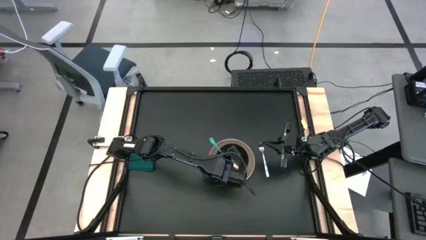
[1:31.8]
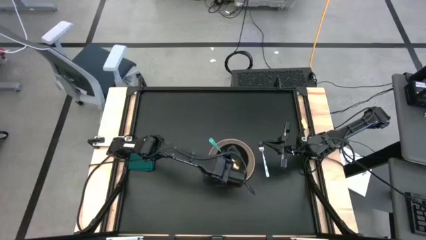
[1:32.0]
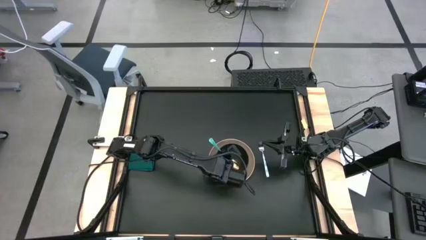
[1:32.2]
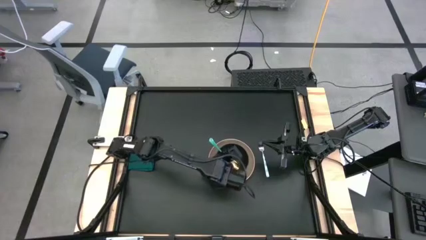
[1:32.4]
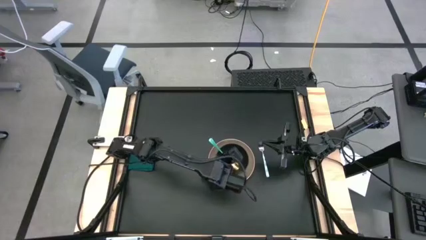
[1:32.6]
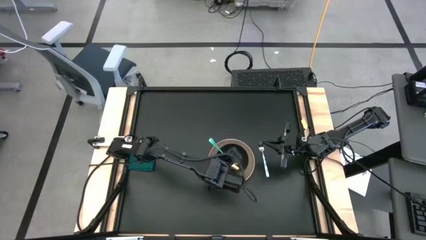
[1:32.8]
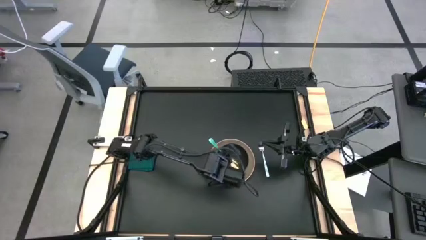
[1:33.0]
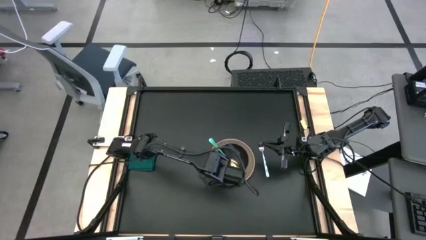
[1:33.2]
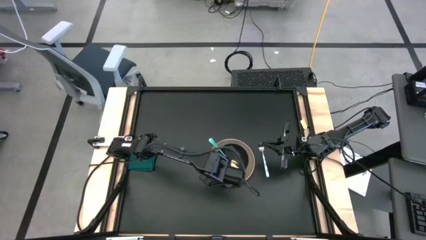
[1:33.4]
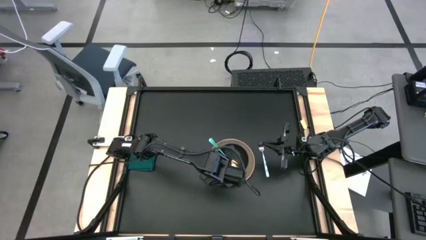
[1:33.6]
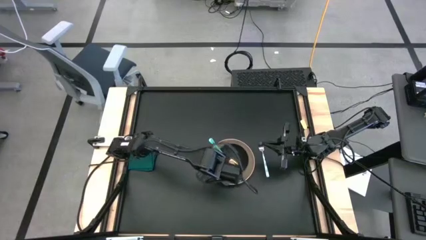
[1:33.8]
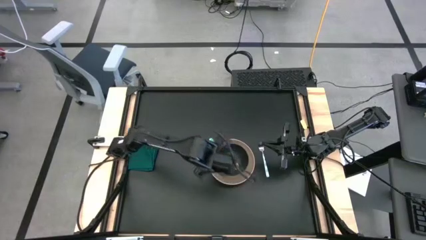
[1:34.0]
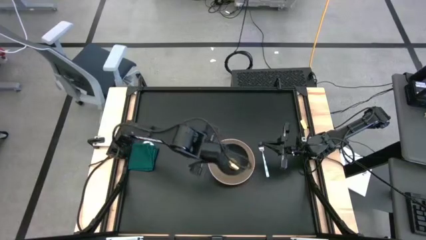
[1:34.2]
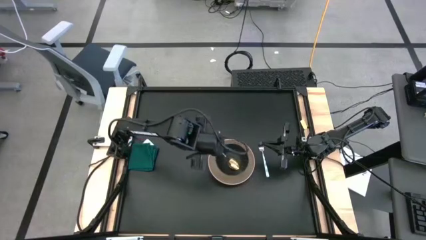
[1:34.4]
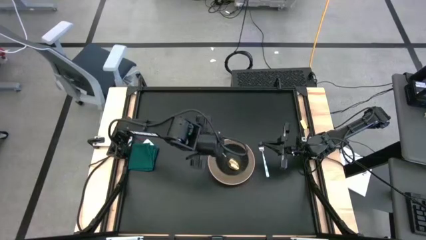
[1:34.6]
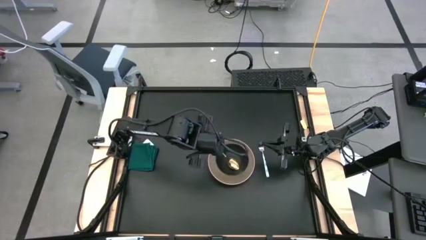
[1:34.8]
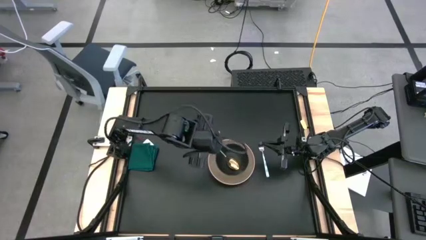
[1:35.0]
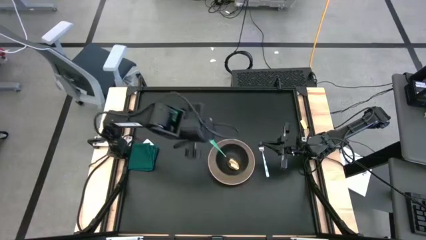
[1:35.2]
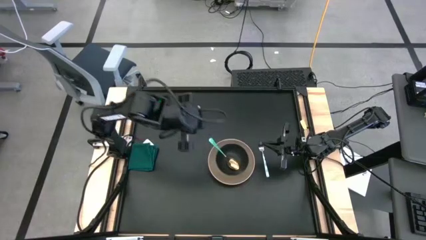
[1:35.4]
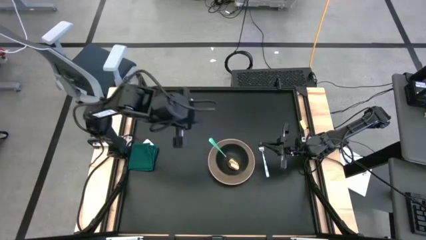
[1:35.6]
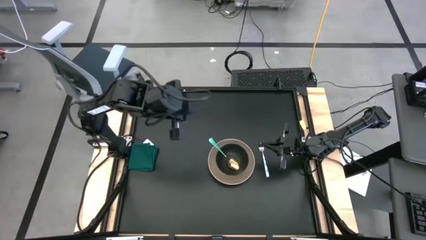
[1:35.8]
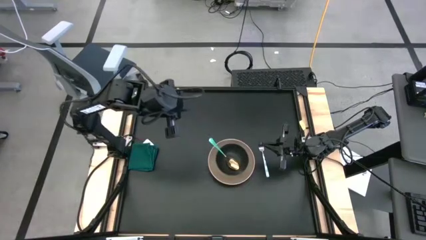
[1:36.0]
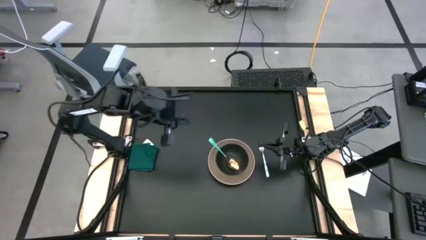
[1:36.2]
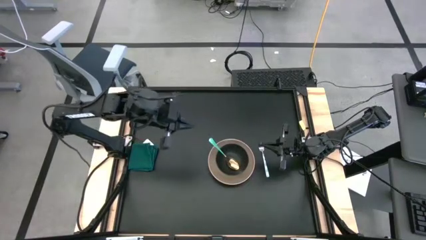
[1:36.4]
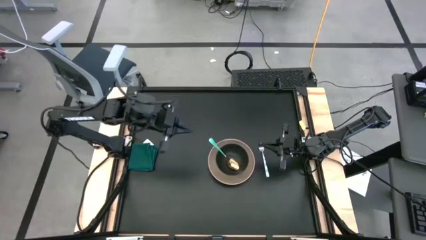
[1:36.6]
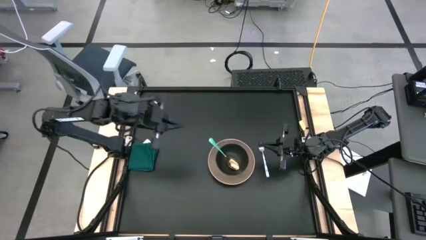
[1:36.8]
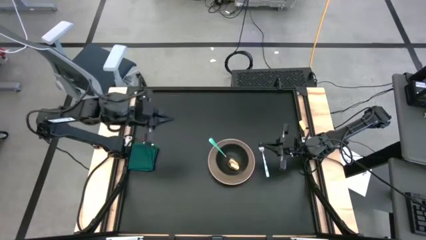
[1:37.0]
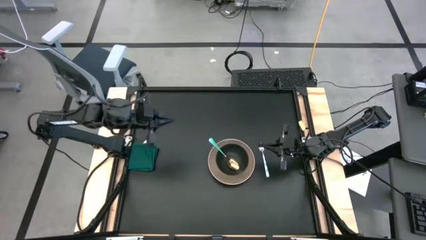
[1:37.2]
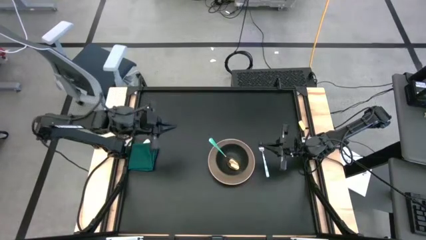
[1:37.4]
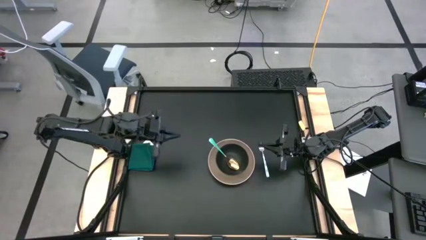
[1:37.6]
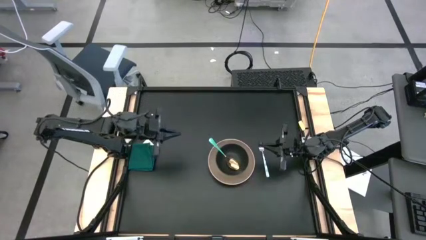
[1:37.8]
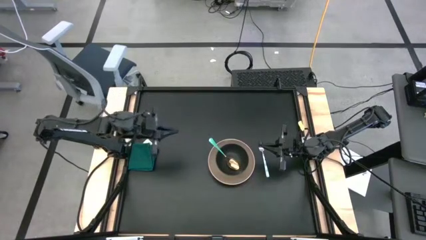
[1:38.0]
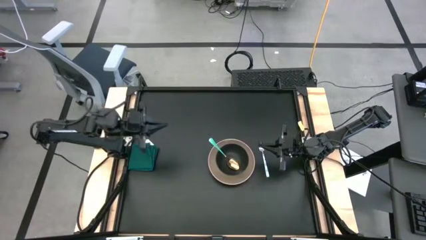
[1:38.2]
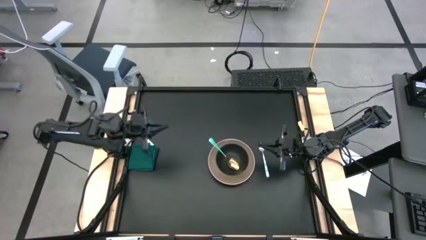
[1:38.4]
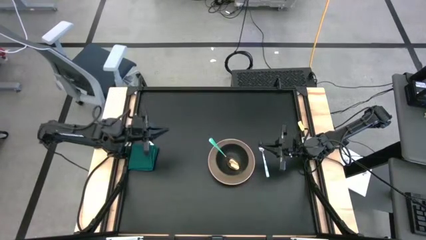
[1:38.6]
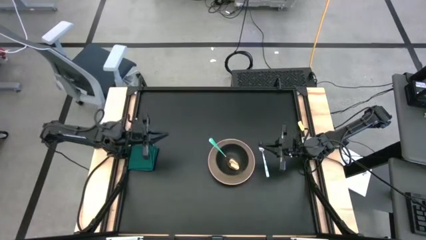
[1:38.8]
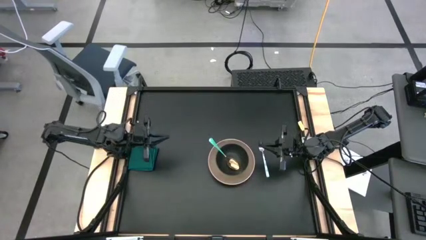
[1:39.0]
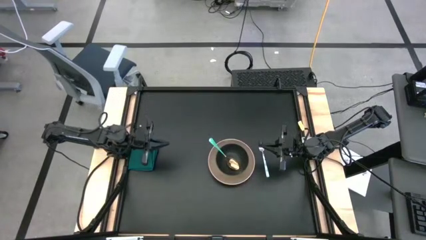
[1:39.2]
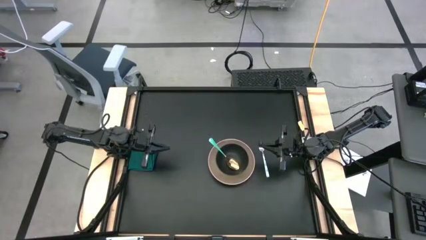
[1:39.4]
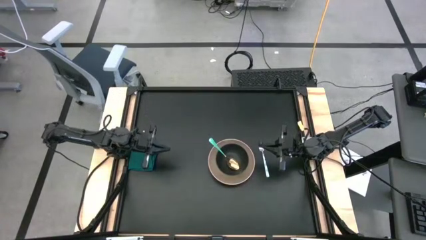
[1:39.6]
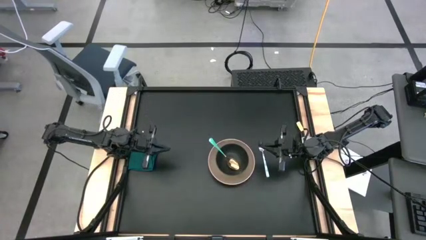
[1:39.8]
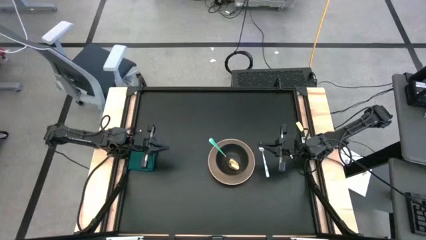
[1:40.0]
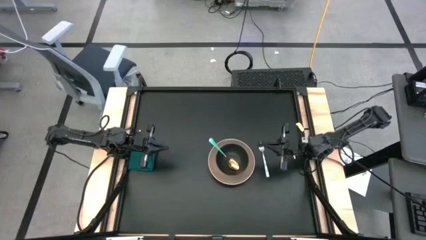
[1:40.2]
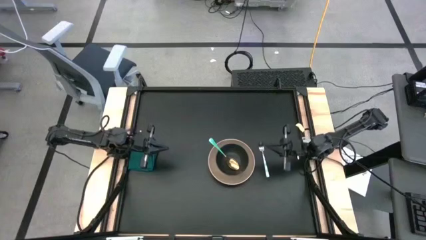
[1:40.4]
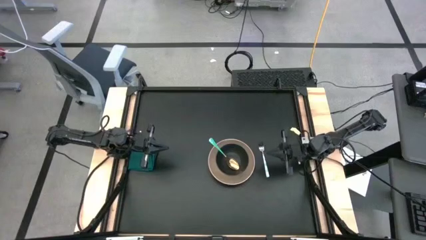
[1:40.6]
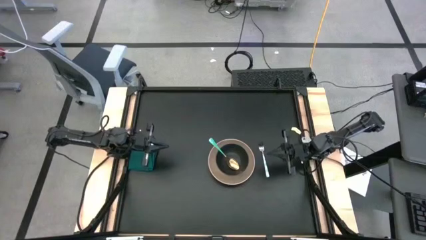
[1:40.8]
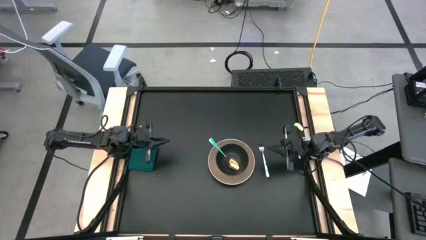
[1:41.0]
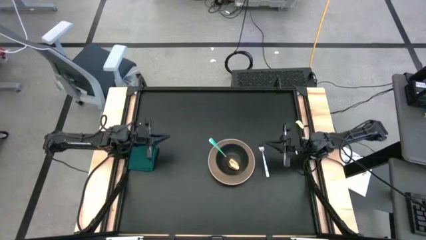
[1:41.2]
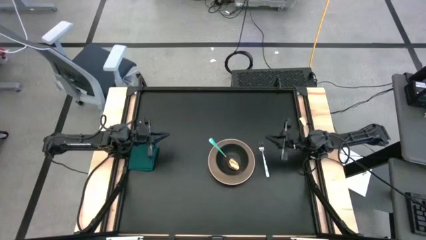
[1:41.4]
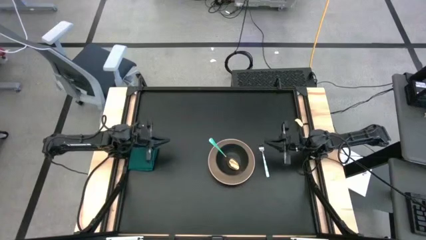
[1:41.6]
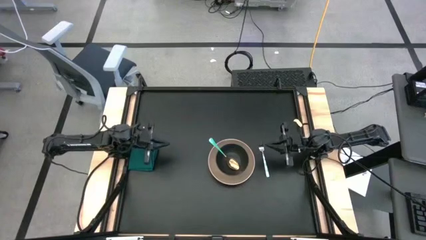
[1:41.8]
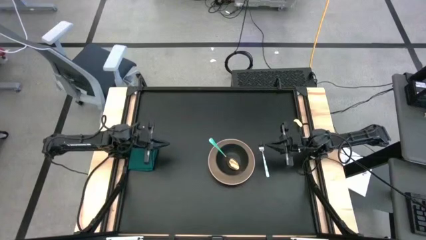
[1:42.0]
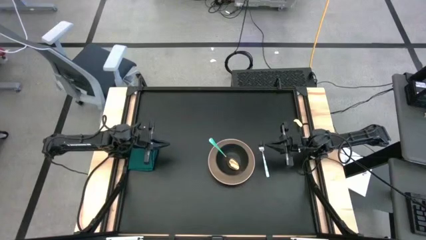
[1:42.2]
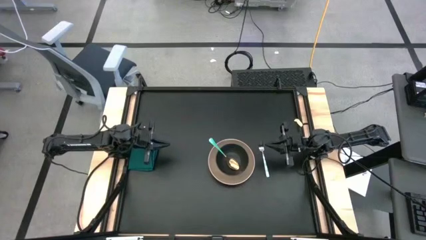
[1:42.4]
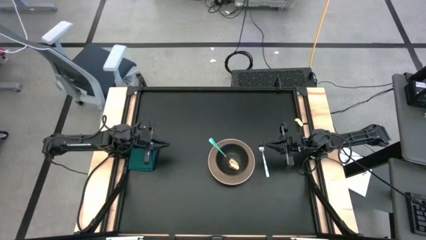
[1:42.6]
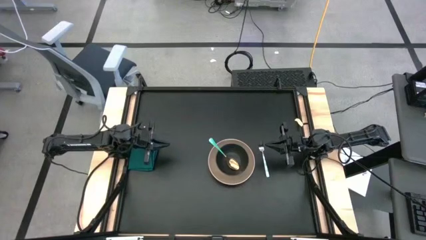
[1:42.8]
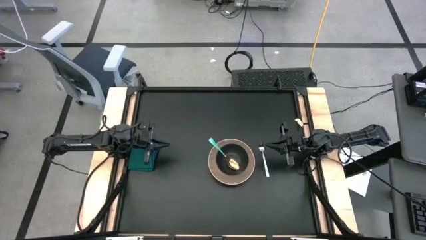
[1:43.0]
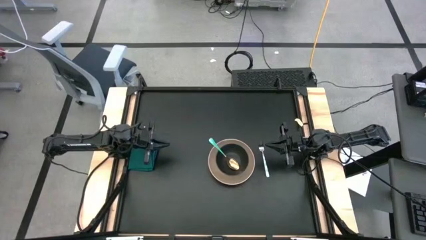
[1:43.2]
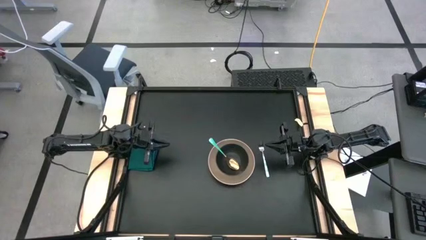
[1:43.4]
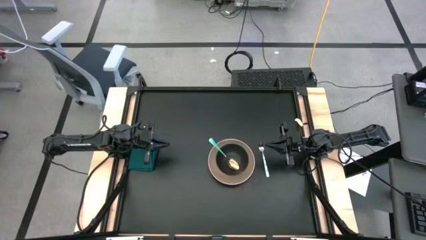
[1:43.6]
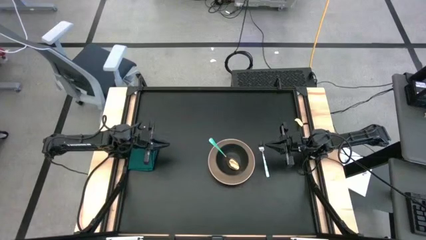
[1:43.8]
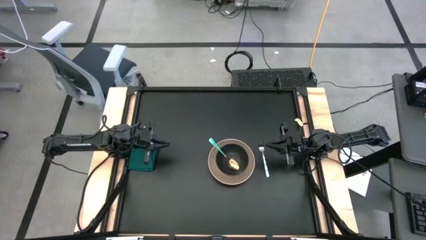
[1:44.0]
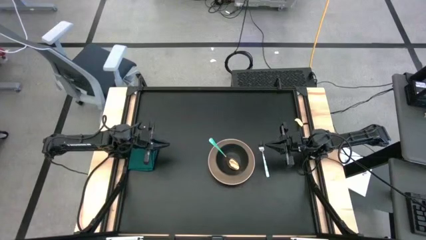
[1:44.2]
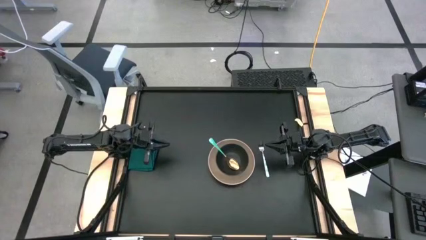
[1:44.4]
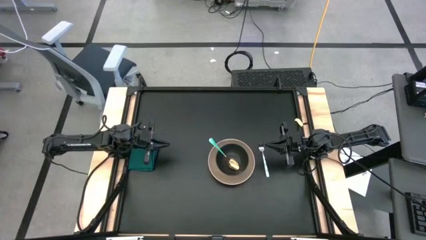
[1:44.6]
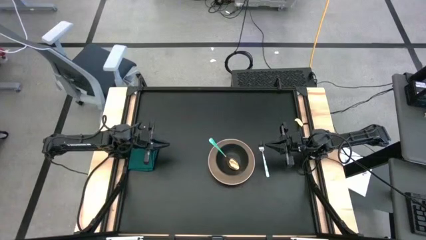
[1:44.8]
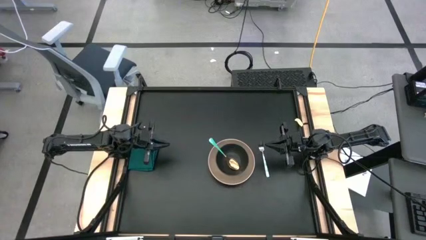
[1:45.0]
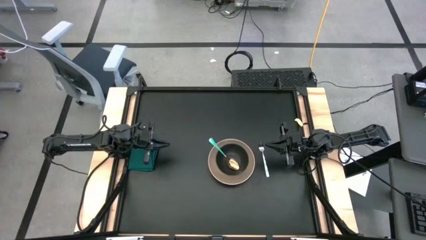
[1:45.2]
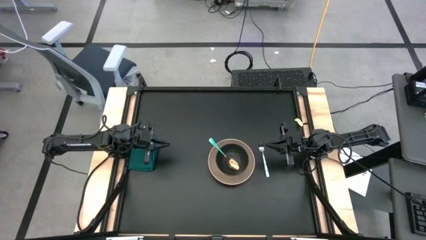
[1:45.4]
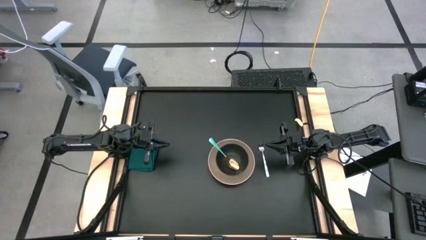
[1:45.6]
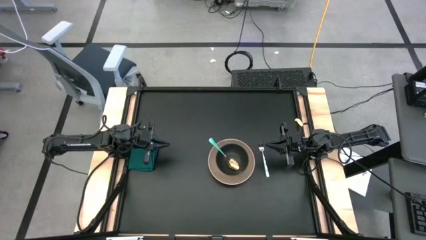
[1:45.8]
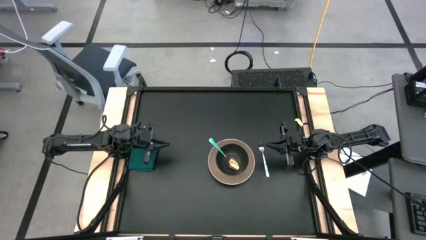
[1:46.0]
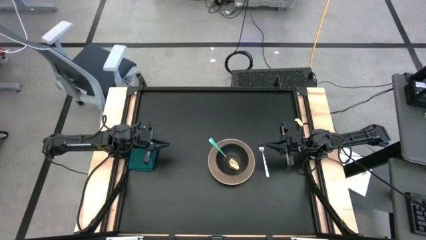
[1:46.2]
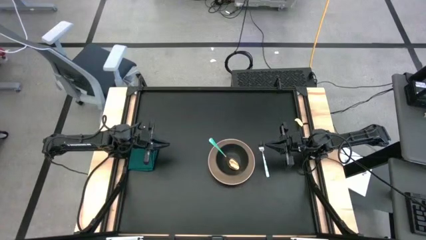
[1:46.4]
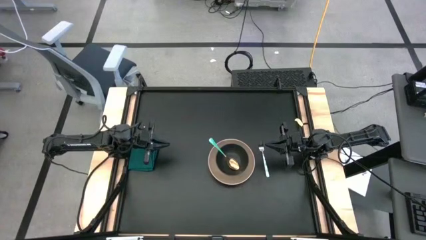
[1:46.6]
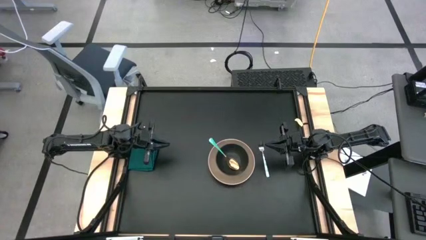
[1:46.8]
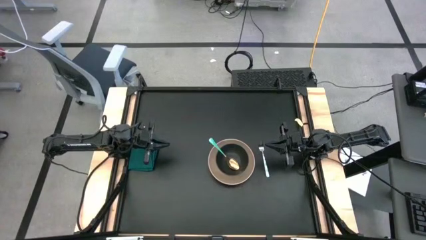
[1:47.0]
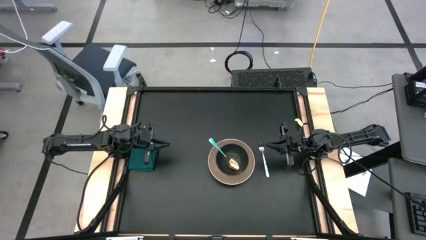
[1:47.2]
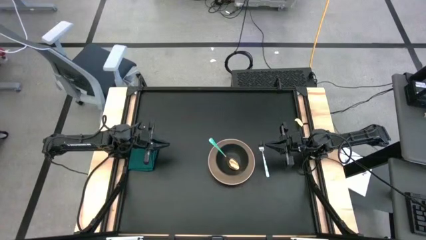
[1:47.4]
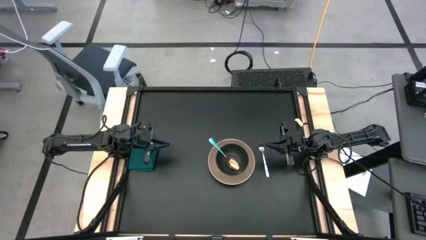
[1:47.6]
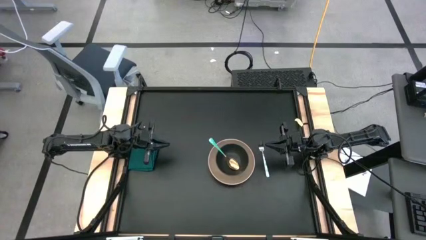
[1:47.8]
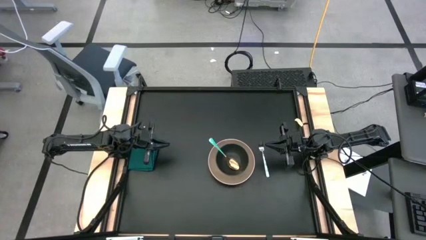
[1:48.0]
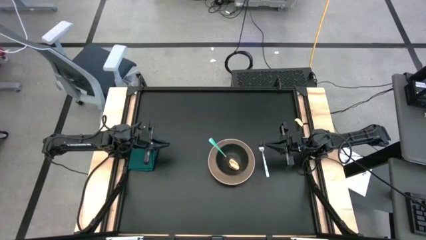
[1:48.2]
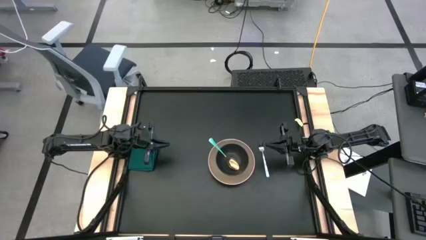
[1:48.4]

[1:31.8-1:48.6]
Task: Set table place
Return to Home Position
